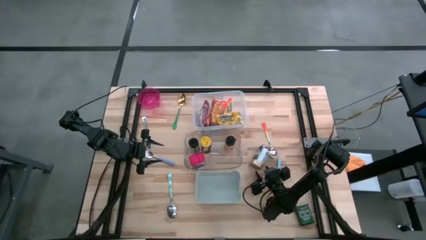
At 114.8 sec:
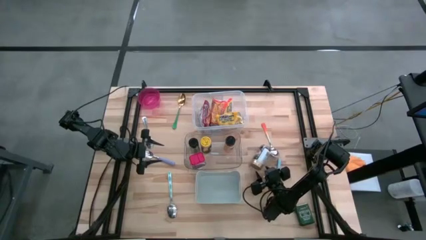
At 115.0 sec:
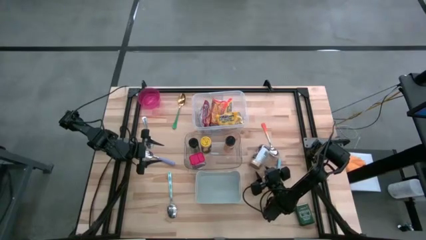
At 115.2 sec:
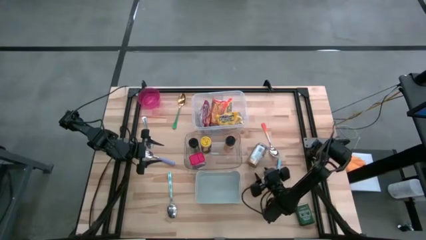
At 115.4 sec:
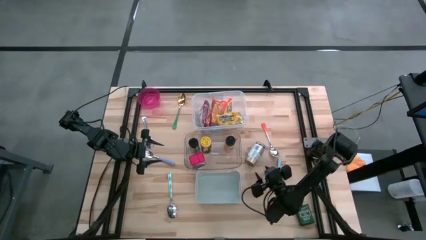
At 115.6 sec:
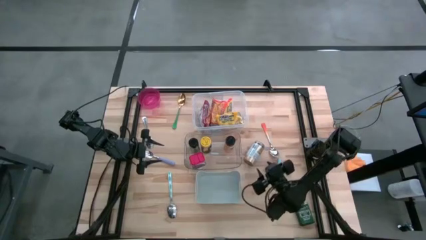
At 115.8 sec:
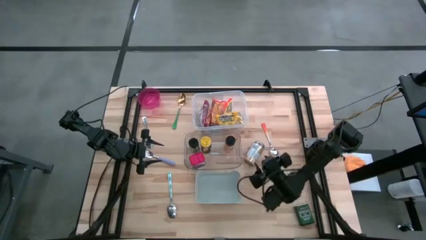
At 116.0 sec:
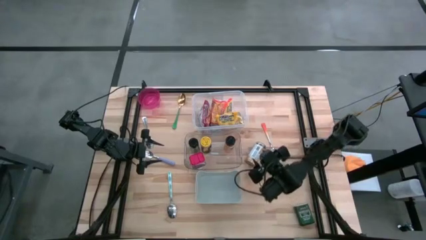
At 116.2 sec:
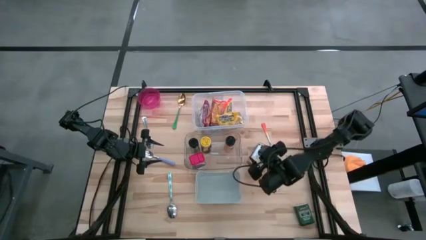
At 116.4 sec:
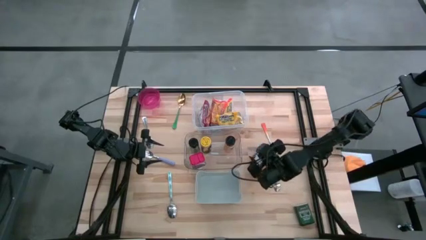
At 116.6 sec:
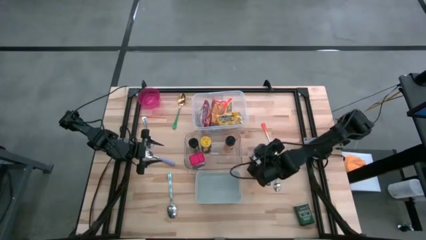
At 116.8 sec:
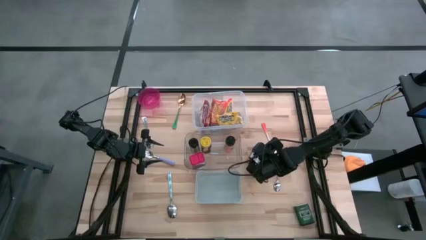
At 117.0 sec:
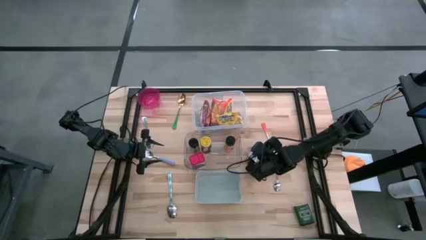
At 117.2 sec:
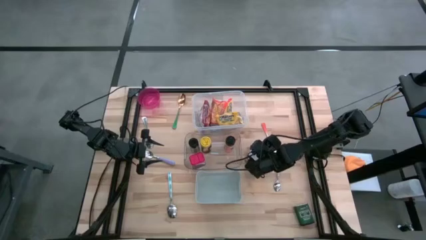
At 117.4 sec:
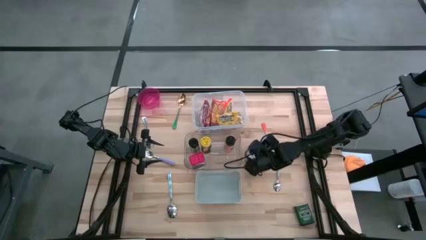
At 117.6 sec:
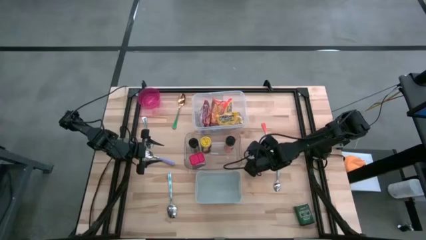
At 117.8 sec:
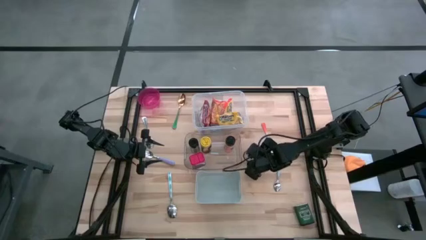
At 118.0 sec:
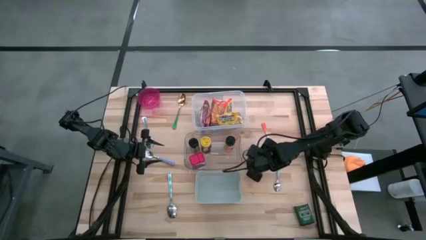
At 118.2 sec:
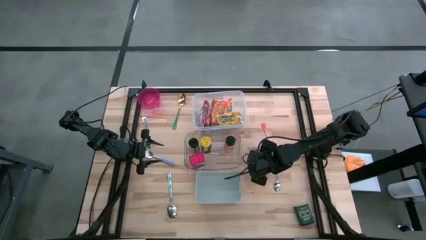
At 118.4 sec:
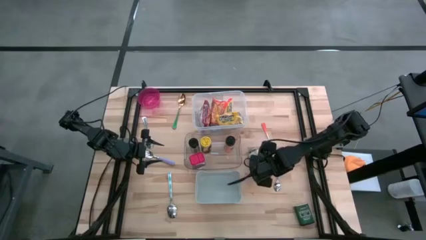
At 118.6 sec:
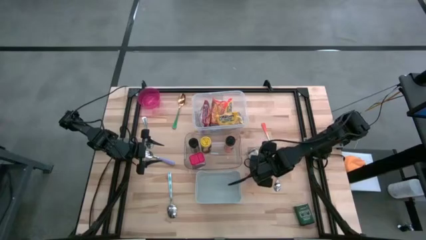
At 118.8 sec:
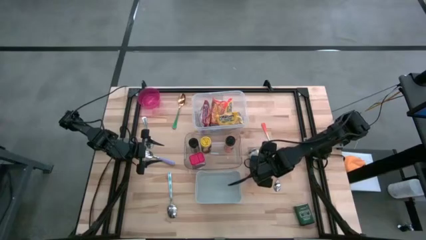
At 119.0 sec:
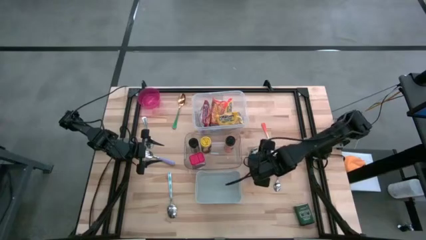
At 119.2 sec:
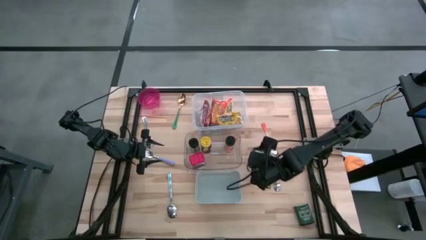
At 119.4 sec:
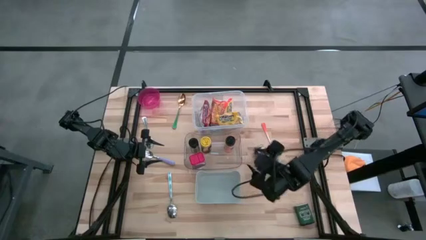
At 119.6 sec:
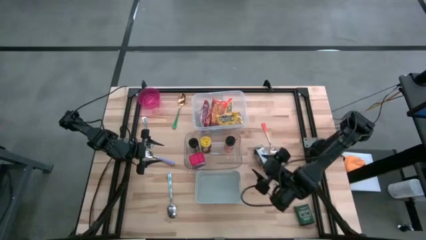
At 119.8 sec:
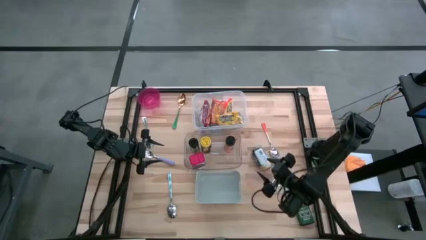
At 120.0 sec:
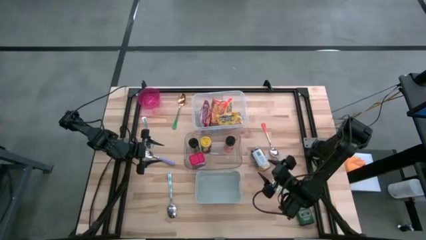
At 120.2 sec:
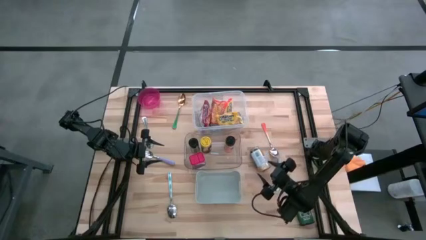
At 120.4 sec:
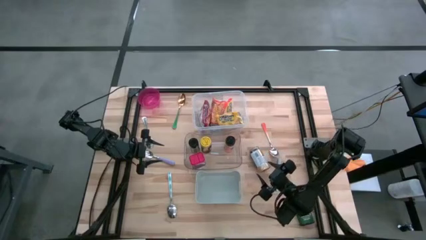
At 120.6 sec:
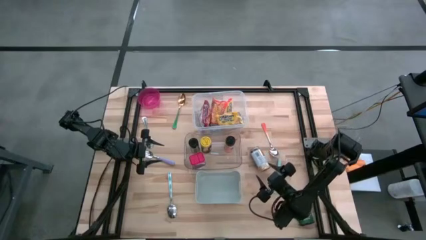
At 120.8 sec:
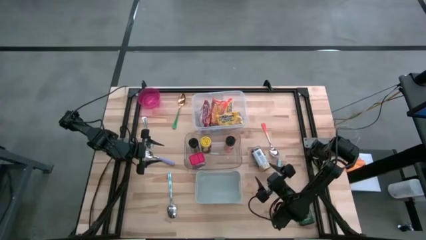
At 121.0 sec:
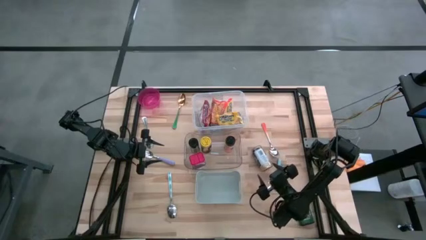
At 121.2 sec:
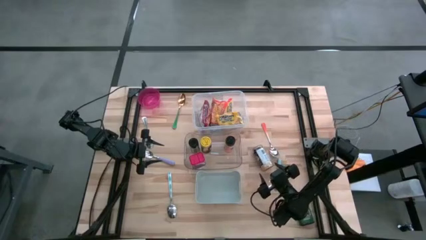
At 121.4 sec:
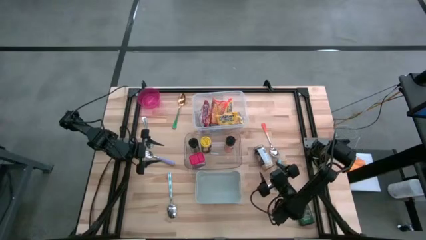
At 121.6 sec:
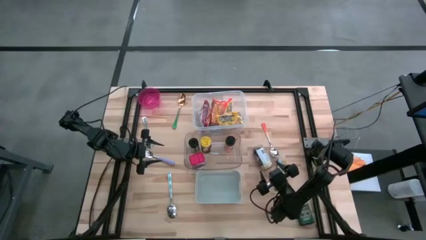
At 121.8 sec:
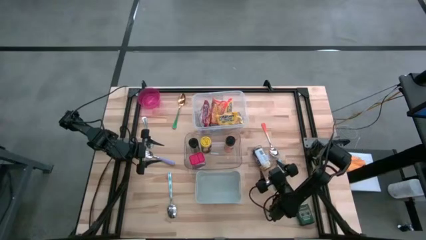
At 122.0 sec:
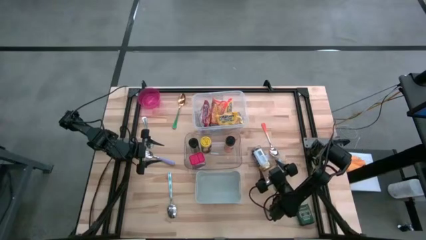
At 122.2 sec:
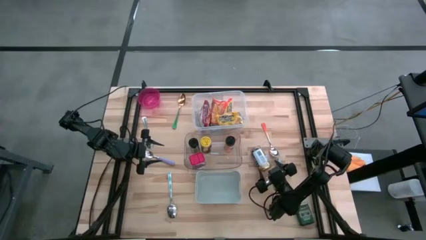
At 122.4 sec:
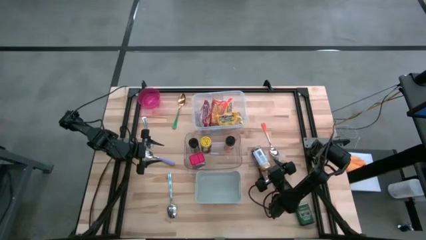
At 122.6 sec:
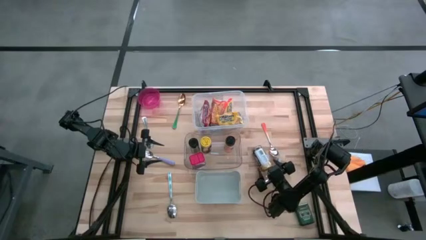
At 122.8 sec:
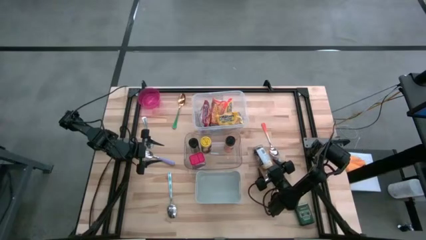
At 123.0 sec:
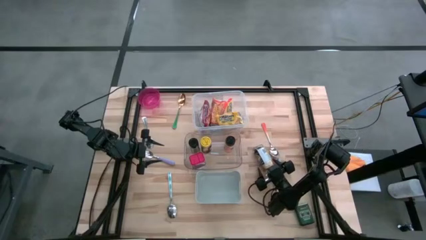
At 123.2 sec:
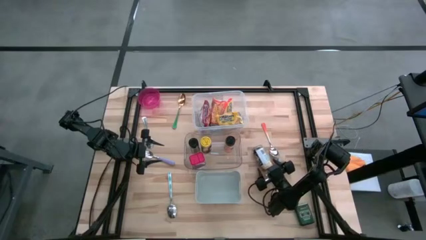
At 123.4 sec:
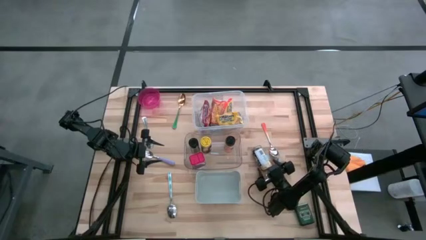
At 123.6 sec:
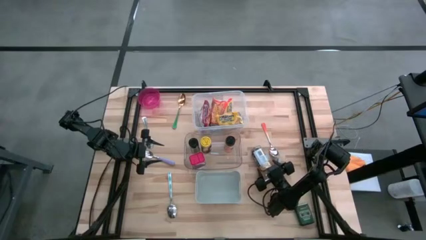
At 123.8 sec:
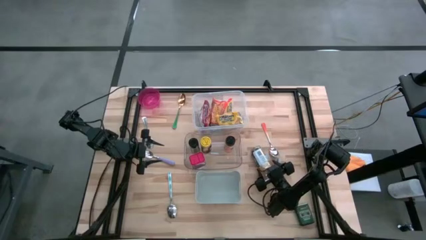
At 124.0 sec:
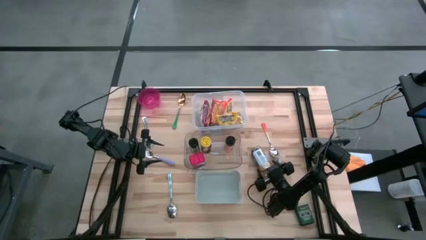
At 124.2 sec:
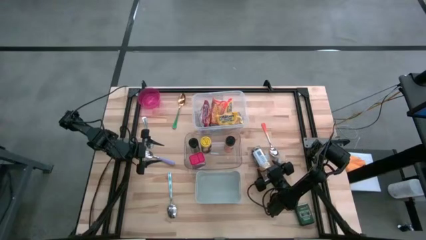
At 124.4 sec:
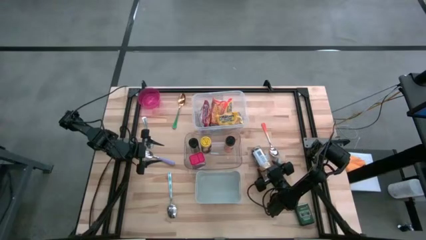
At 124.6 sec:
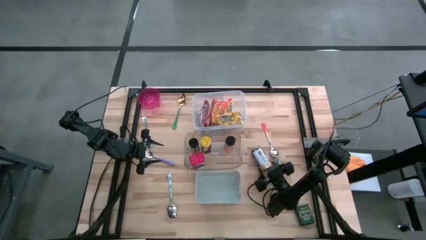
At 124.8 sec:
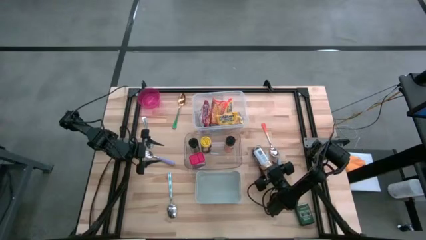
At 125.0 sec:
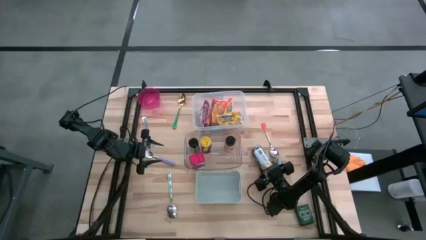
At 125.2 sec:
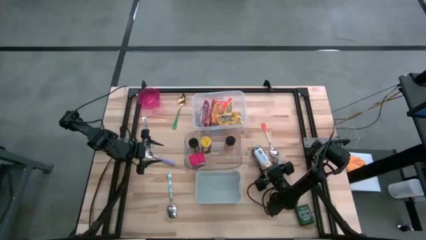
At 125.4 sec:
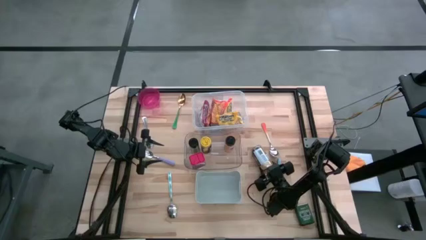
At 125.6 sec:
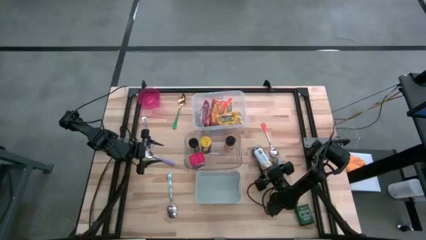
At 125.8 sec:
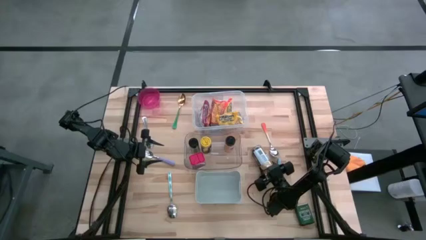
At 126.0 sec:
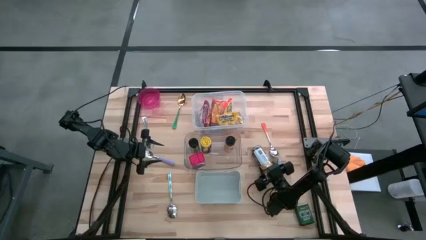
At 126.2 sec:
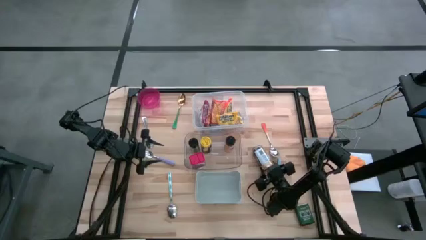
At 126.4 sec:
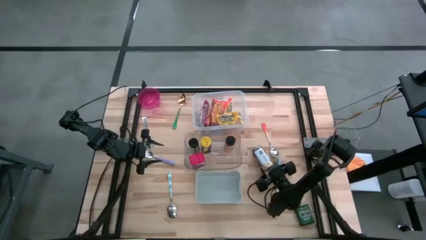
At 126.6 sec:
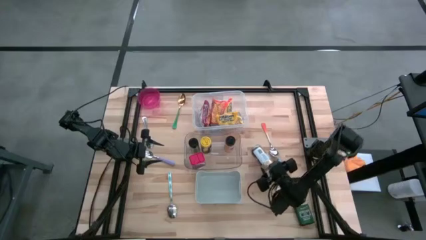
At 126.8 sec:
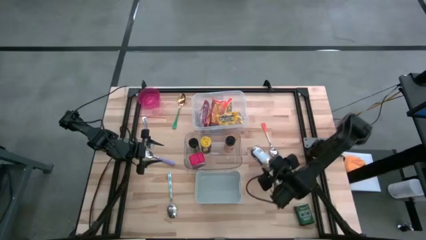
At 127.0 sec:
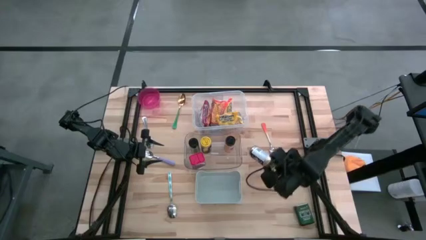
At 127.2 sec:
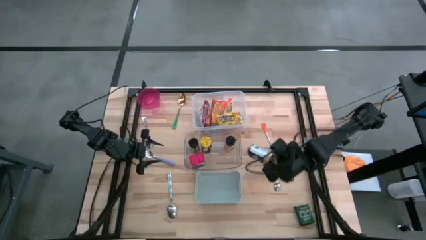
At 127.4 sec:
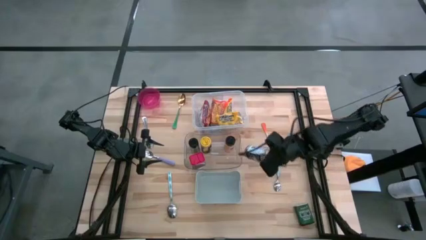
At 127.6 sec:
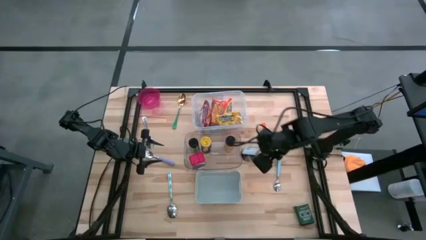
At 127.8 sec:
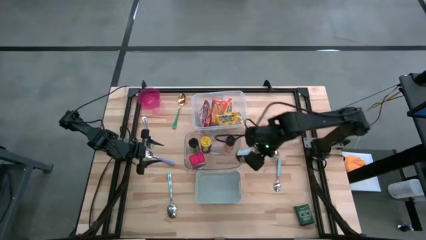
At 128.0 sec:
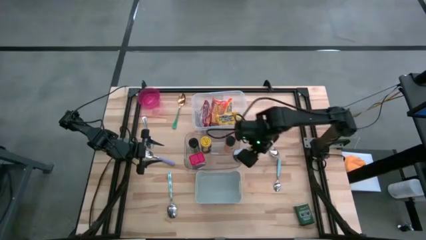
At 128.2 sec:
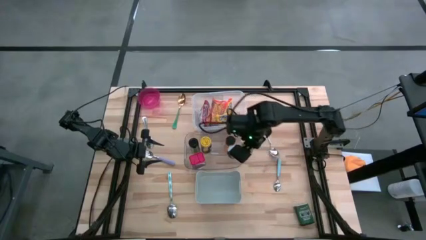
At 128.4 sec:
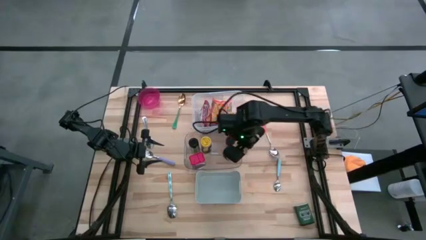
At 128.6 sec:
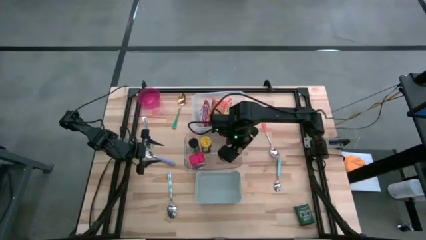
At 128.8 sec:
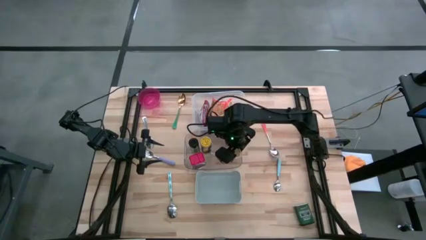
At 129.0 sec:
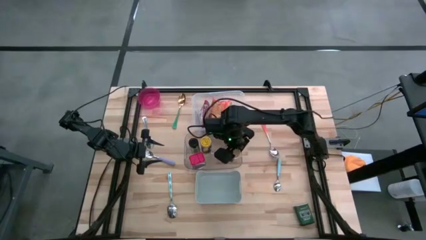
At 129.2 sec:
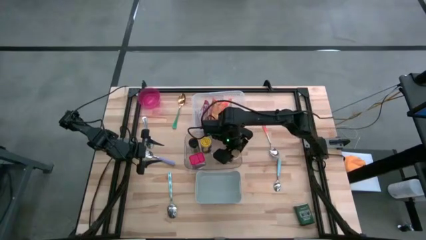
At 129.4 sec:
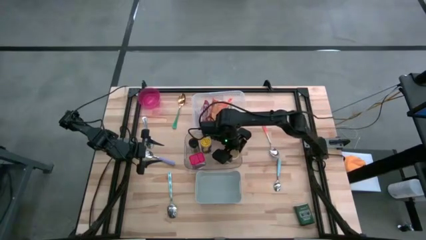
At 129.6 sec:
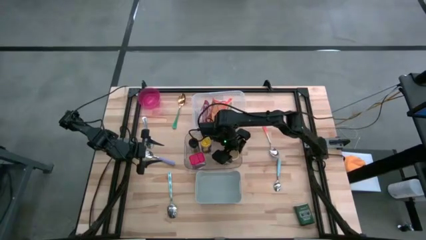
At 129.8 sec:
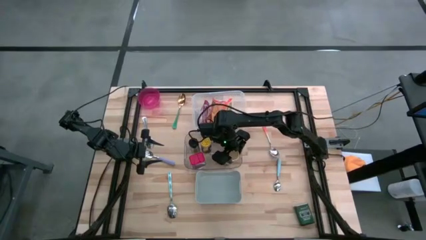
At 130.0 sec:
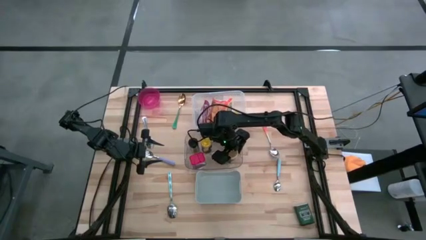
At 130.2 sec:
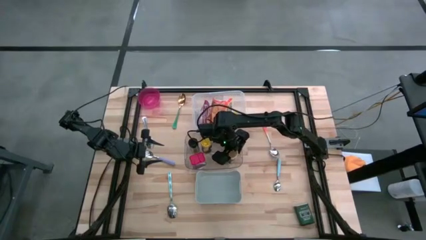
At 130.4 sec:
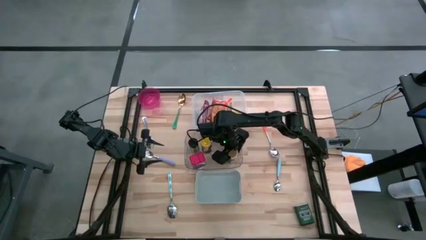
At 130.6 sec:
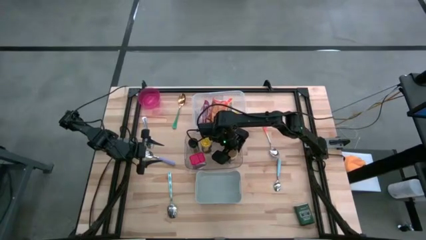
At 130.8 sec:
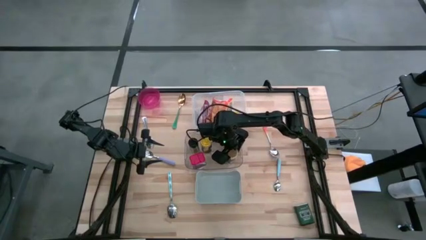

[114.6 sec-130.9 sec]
Put the gold spice bottle into the transparent bin
